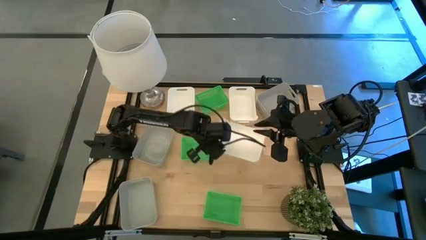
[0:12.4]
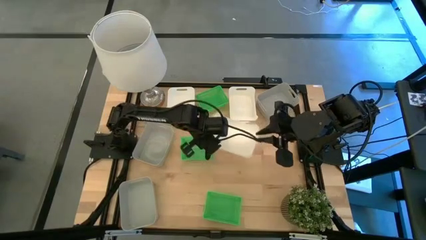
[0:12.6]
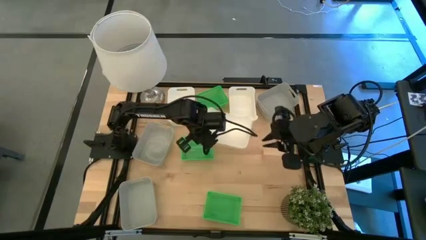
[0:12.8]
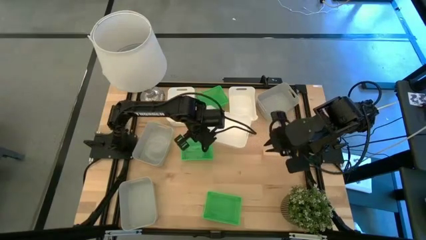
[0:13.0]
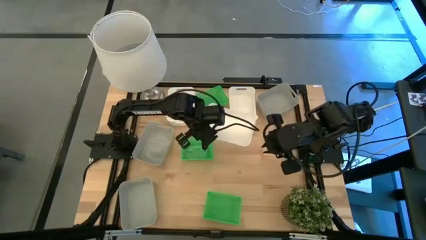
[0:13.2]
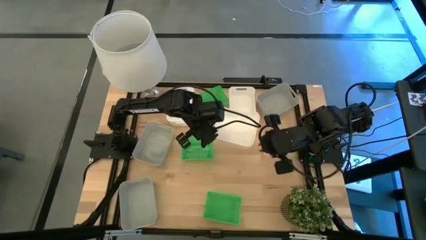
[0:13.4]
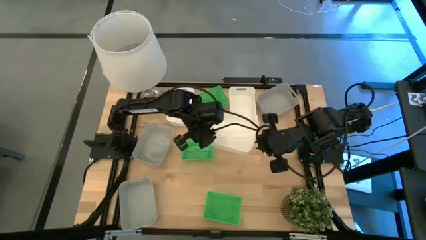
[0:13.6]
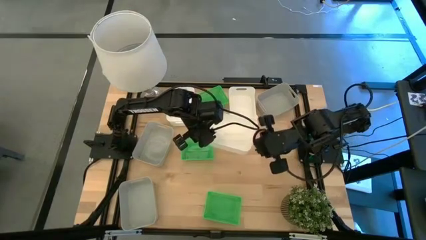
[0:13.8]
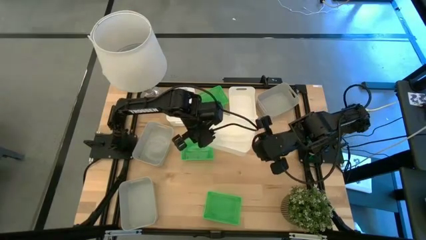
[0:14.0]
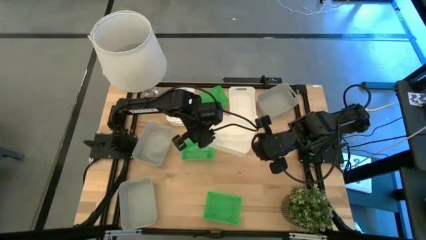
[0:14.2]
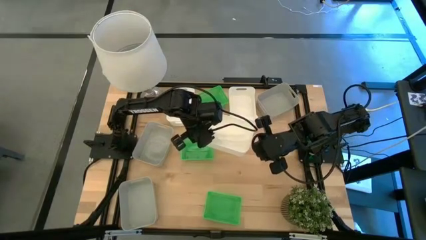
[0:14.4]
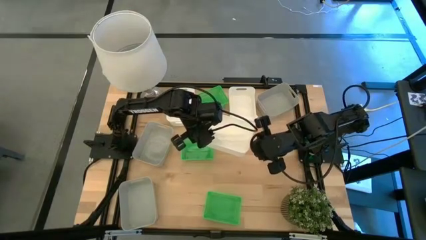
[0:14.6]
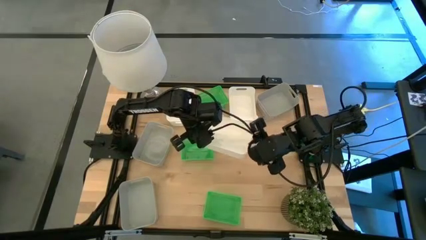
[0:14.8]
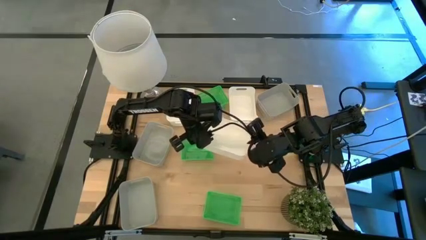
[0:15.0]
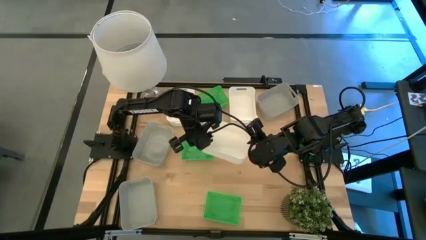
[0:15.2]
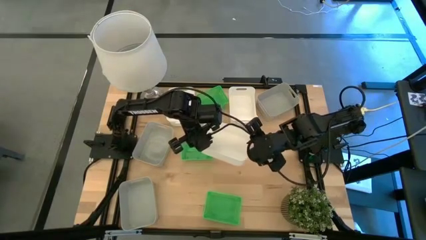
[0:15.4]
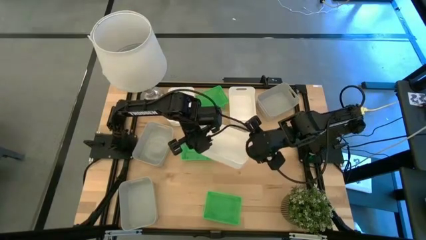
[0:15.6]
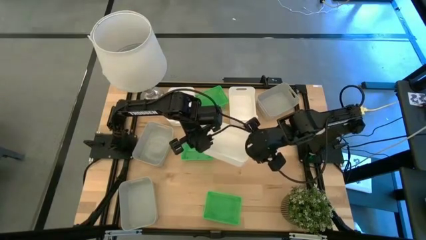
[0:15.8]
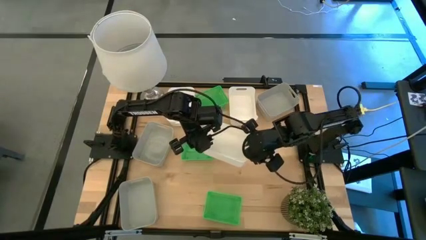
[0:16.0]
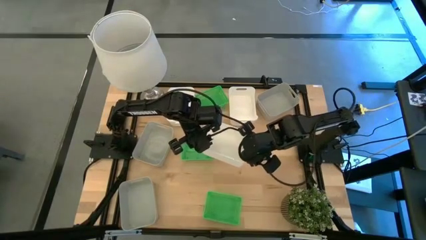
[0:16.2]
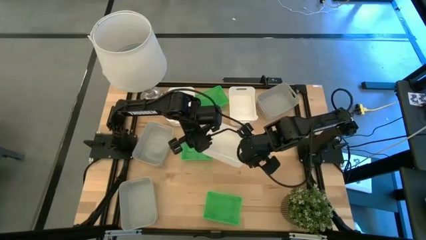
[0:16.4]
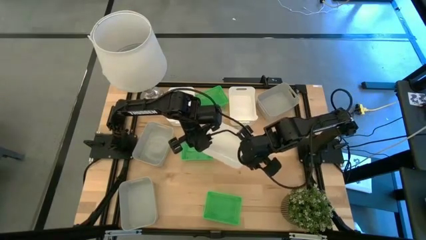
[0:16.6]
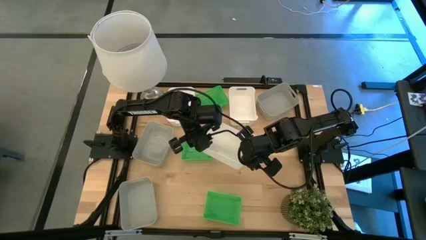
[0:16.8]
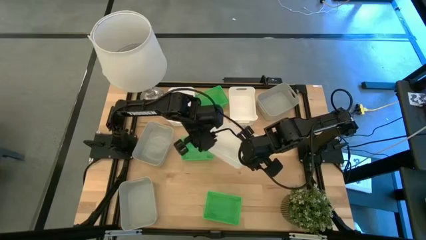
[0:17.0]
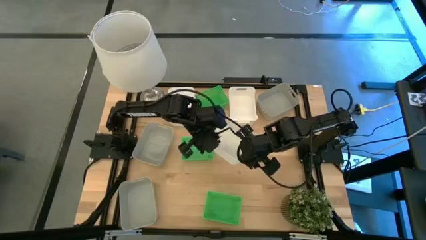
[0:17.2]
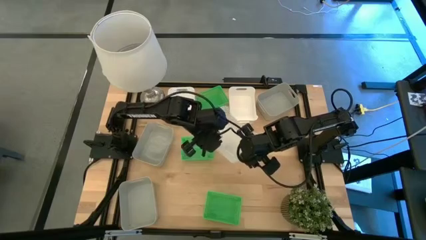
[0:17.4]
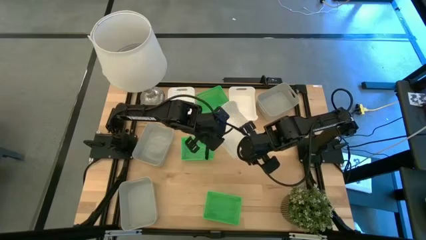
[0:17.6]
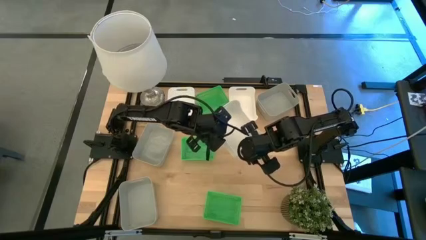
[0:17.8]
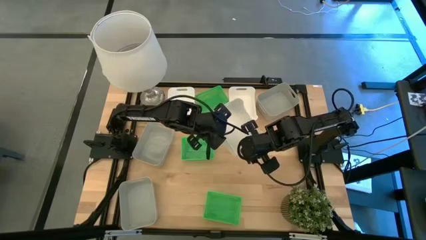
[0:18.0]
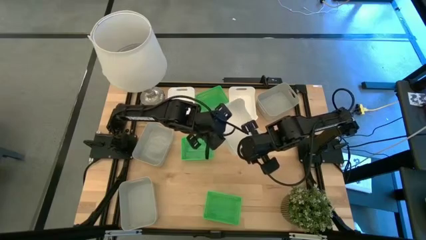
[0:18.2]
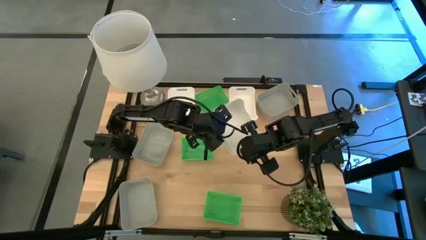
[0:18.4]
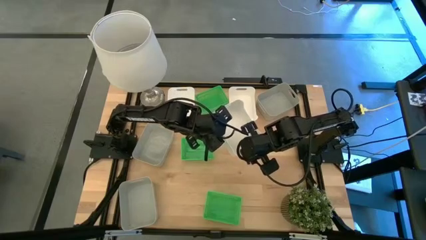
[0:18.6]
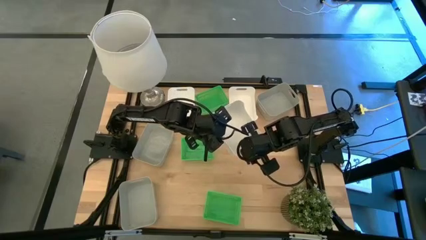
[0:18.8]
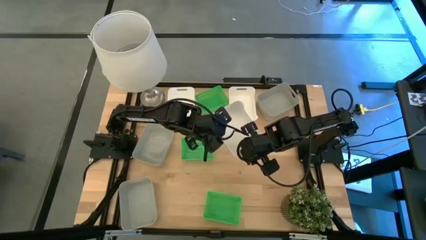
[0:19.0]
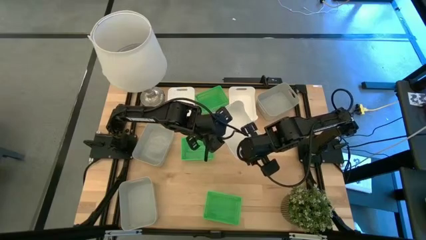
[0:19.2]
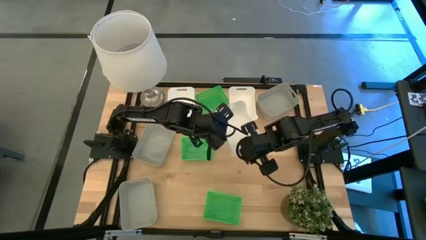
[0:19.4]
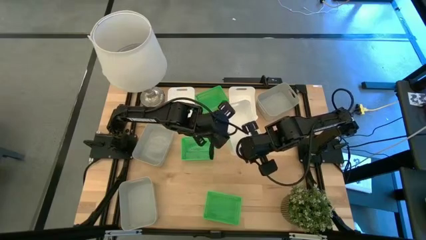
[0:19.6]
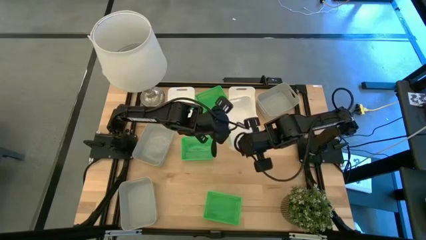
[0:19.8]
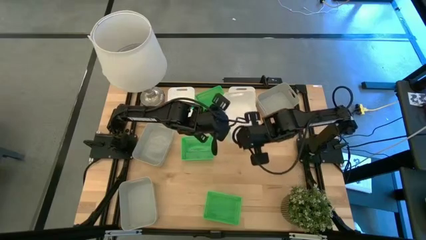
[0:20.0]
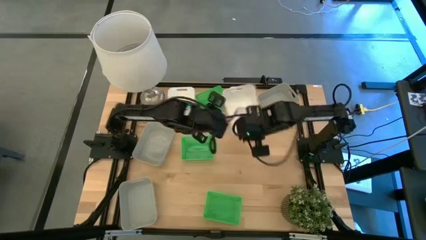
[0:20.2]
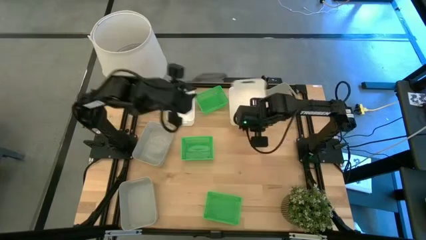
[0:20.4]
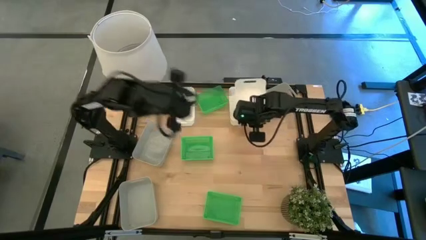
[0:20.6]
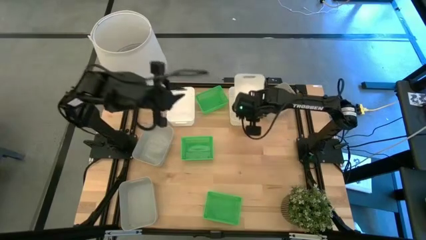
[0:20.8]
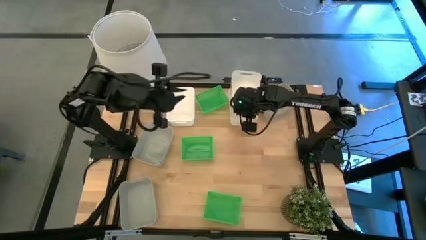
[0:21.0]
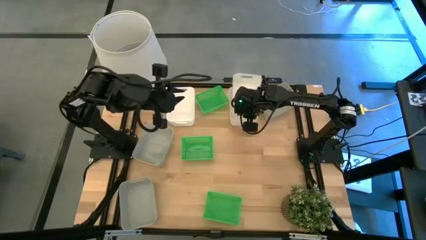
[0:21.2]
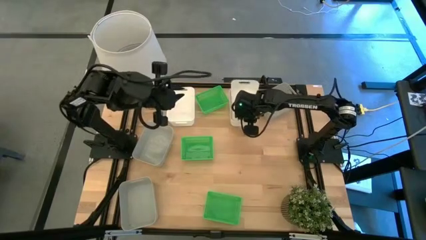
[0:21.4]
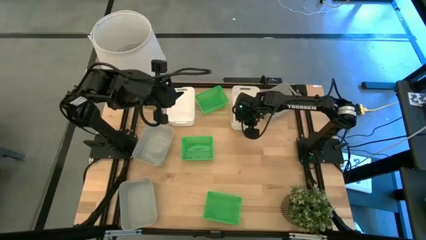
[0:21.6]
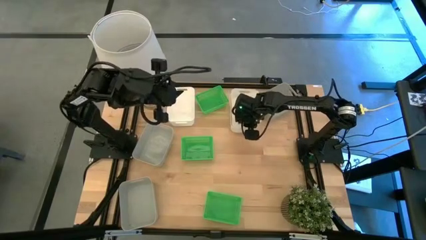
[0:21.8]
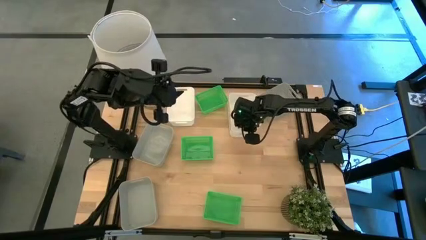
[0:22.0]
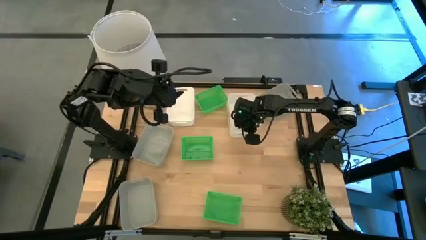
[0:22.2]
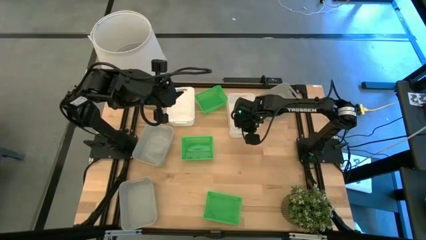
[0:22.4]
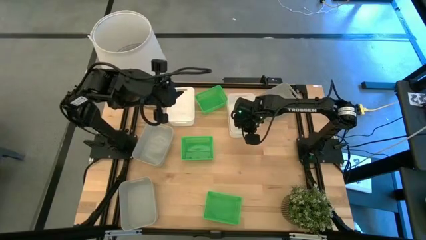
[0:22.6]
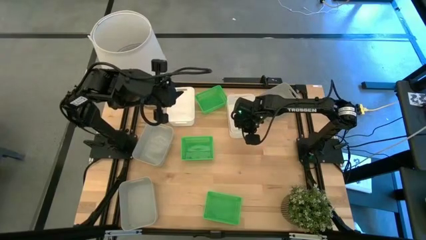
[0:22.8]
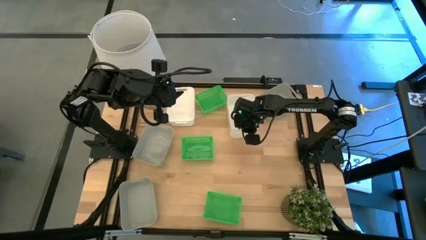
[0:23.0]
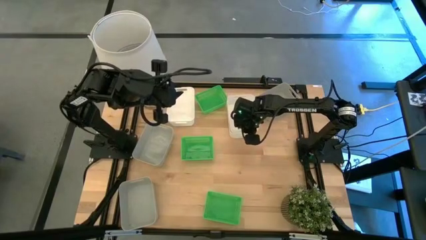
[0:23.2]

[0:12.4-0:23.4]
Stack the bottom white bin on top of the top right white bin

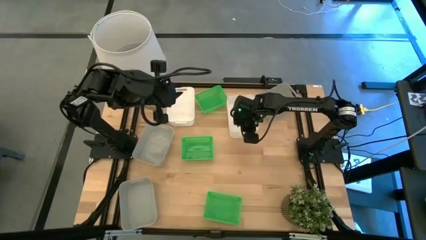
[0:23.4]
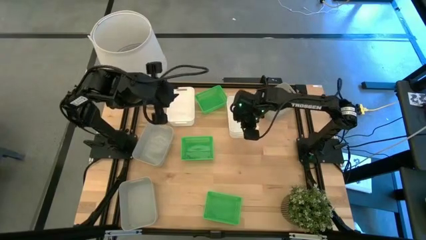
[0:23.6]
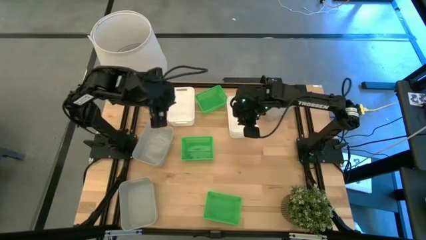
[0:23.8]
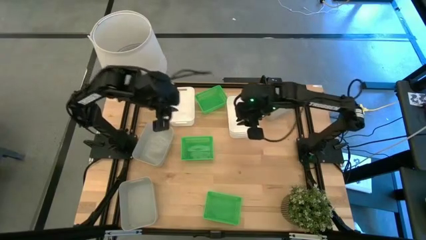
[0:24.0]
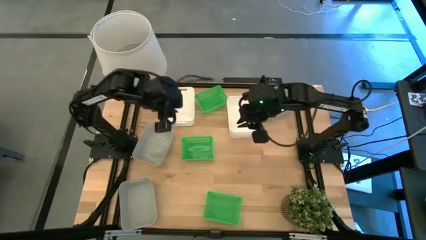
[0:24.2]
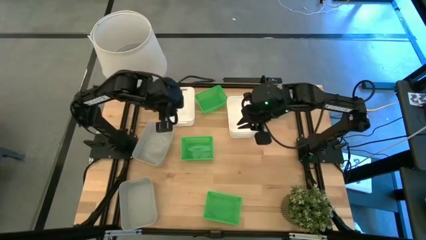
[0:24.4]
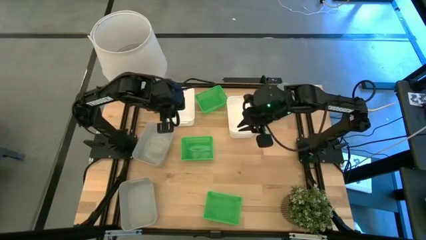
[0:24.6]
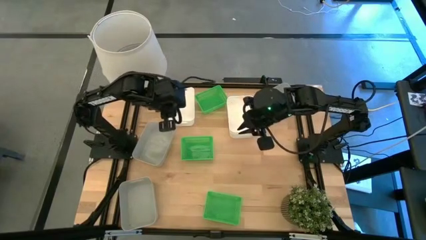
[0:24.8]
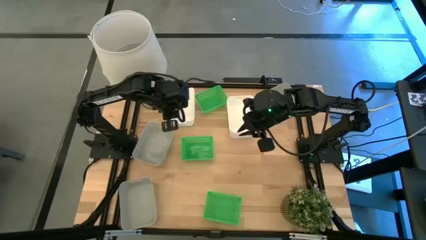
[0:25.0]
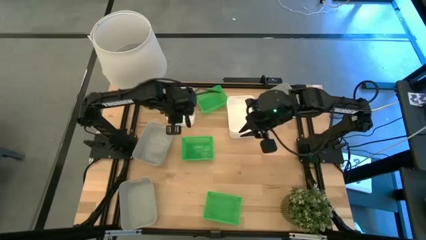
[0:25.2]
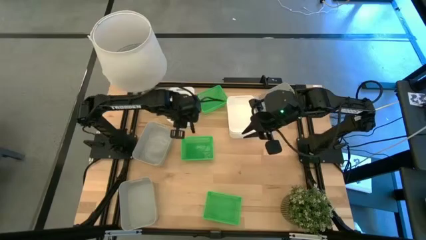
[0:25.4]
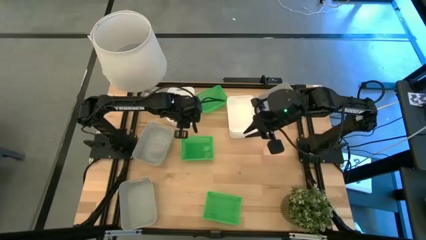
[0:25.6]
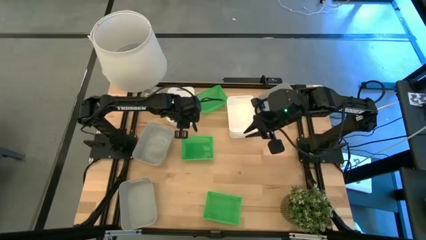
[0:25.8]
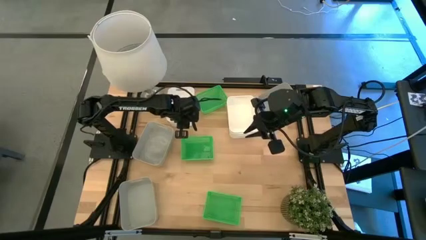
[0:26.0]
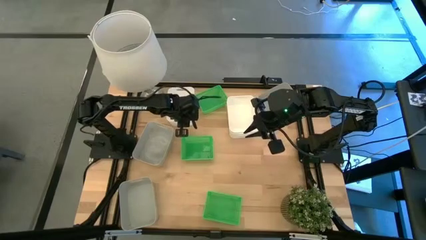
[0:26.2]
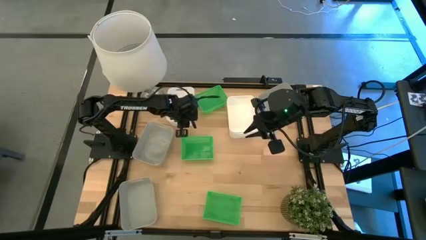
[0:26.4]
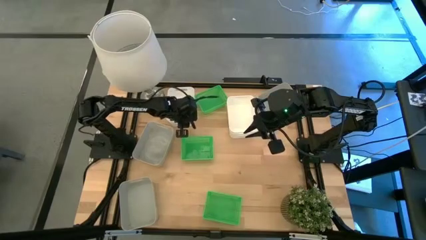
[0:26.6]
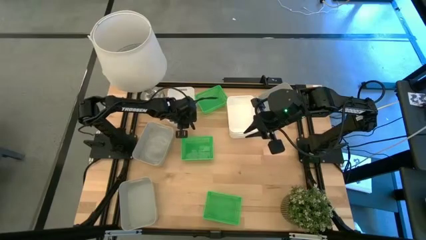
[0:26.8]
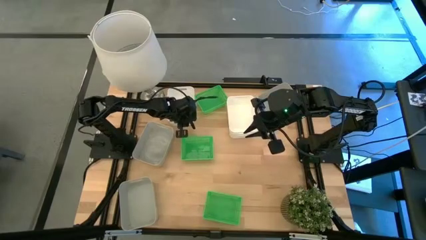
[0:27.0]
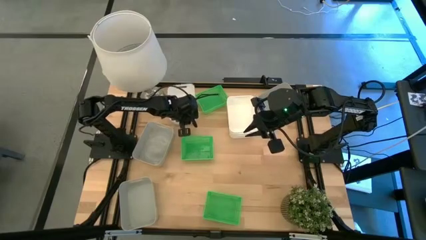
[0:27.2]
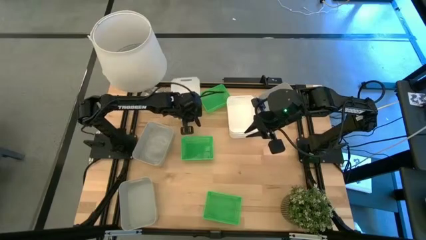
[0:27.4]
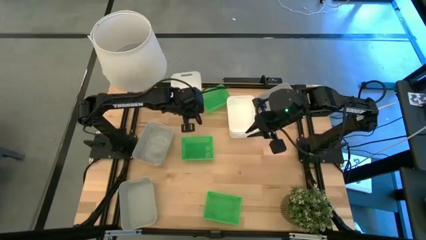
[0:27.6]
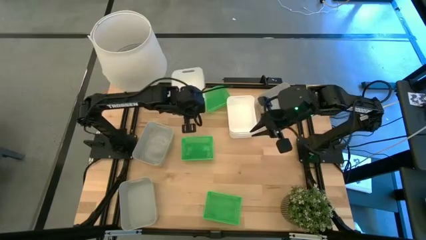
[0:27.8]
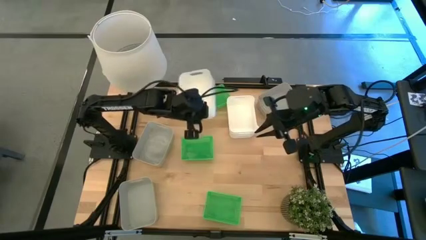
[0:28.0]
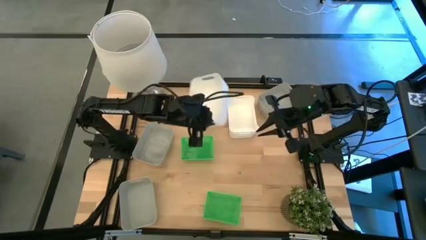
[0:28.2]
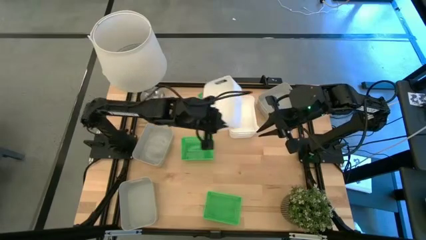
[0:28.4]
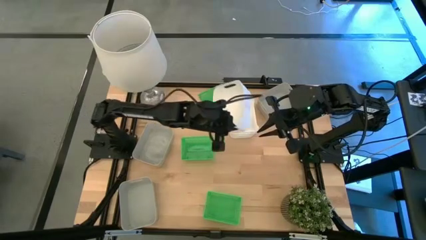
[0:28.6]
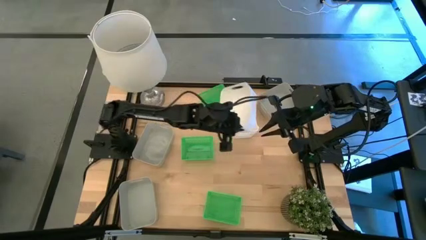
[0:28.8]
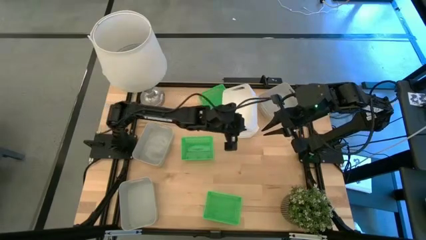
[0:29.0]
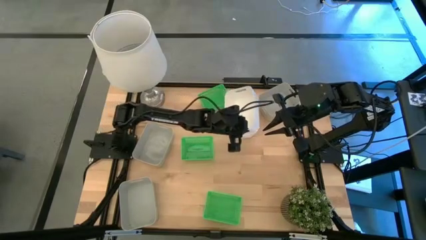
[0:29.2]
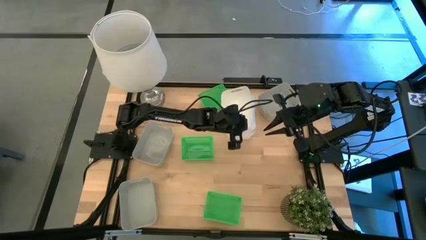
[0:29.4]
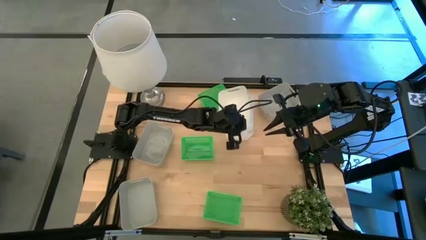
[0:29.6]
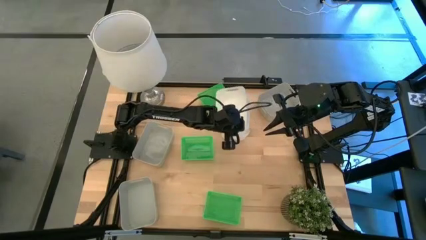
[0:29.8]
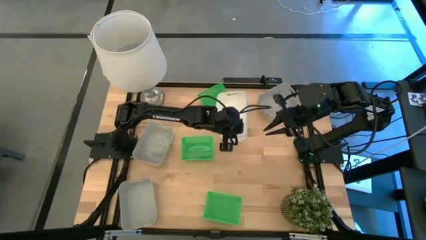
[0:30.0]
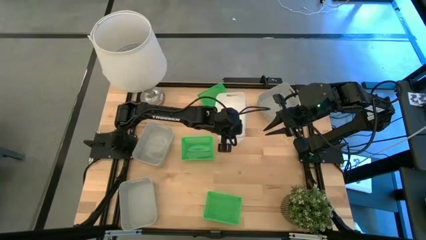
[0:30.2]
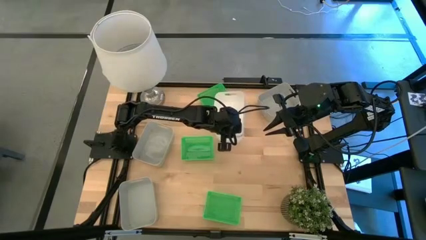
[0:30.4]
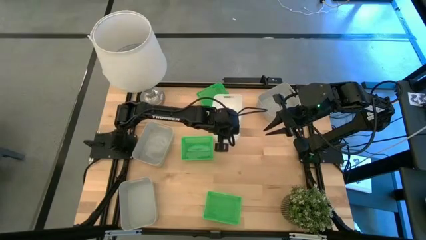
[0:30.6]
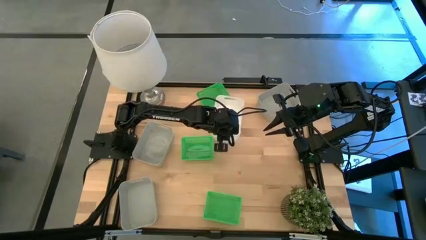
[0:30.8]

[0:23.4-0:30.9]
Stack the left white bin on top of the right white bin
